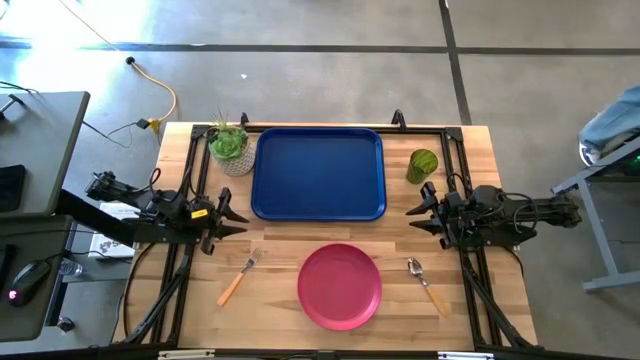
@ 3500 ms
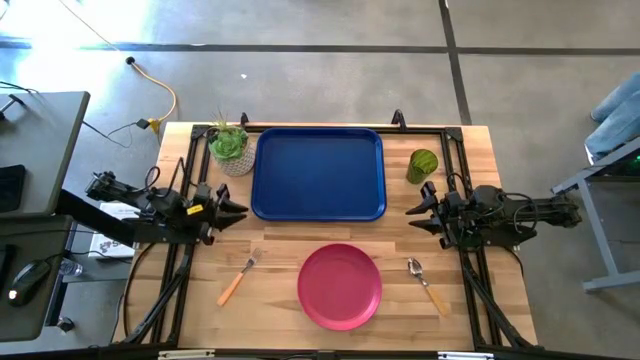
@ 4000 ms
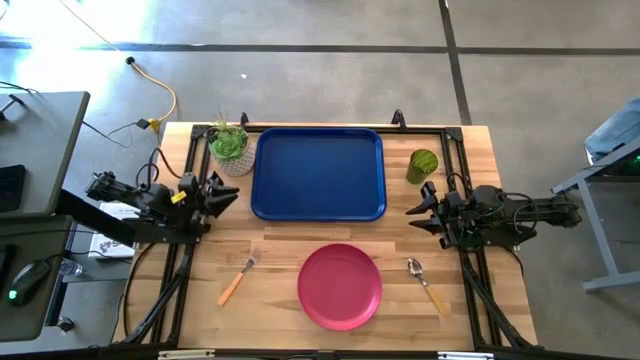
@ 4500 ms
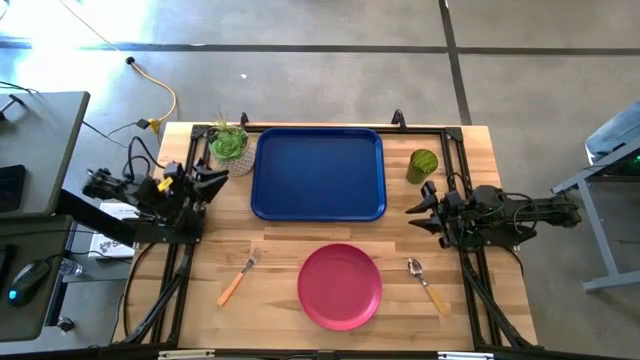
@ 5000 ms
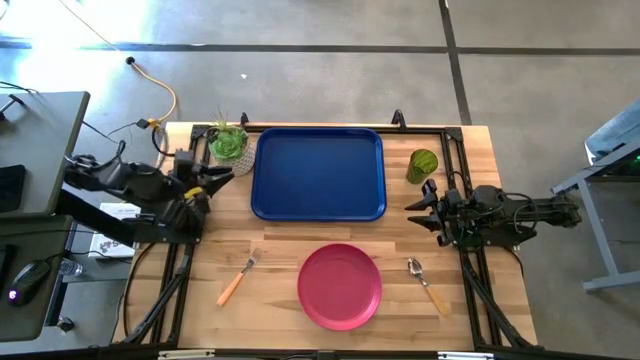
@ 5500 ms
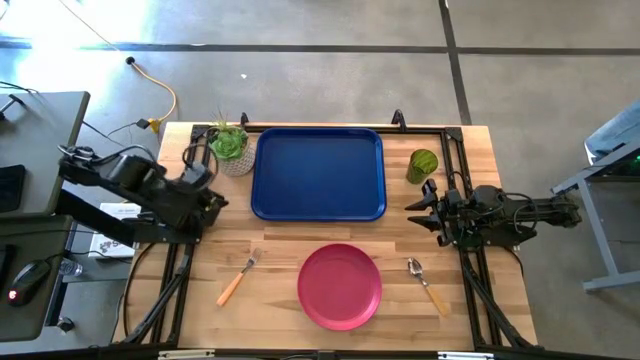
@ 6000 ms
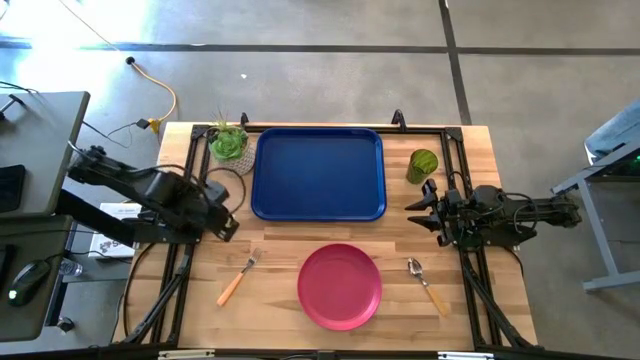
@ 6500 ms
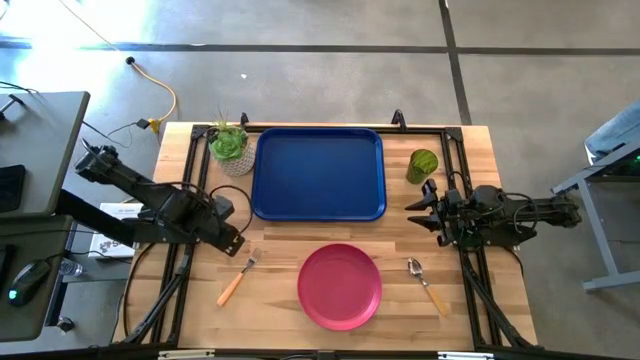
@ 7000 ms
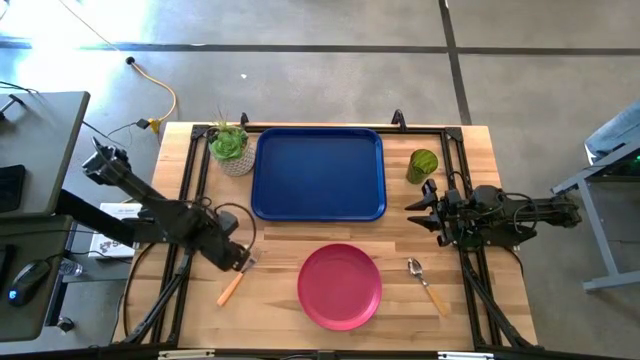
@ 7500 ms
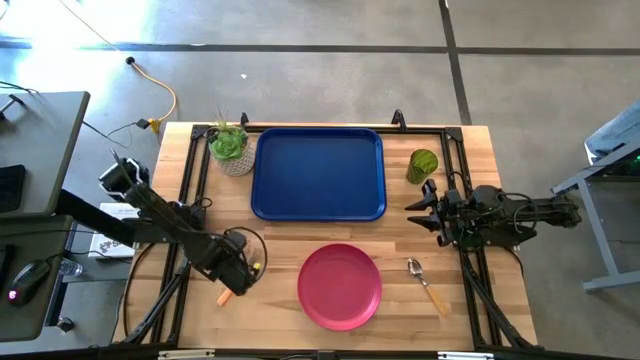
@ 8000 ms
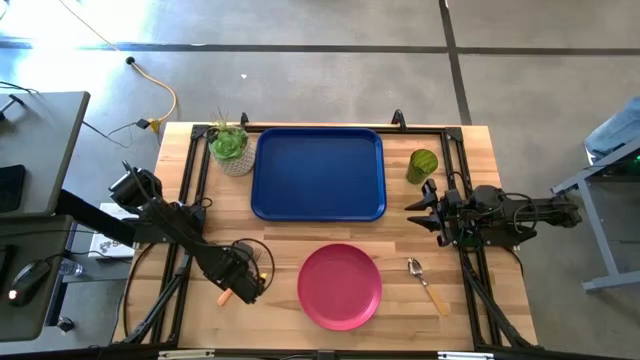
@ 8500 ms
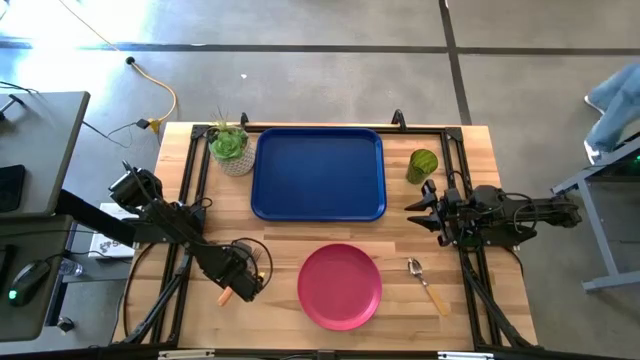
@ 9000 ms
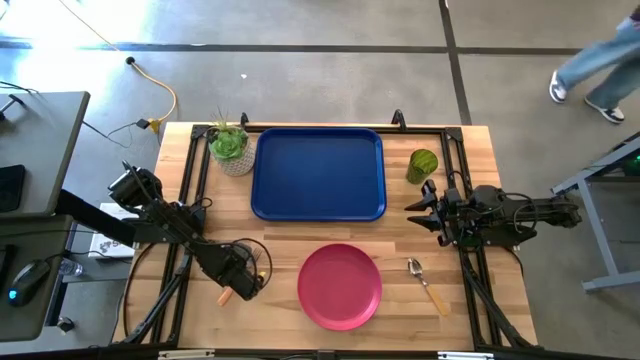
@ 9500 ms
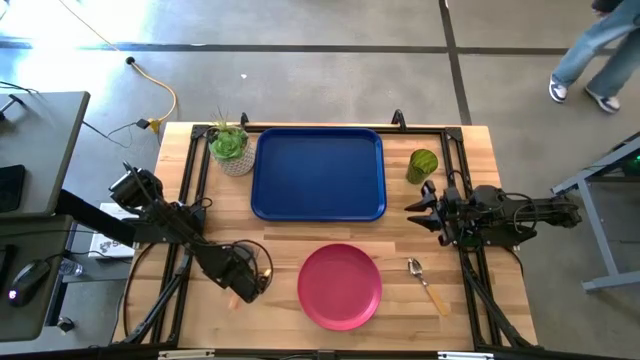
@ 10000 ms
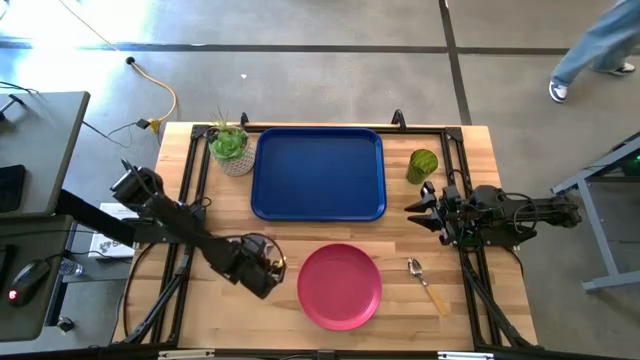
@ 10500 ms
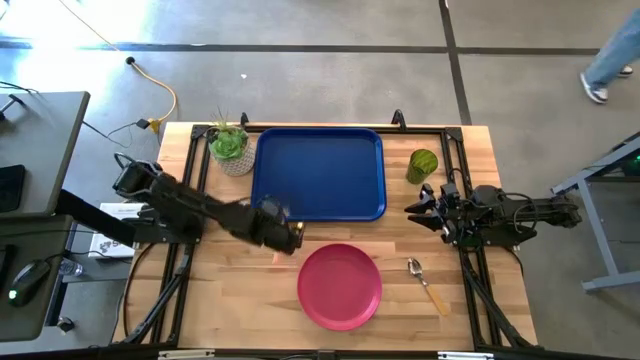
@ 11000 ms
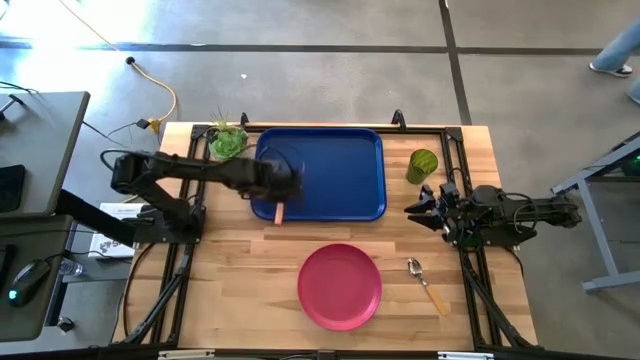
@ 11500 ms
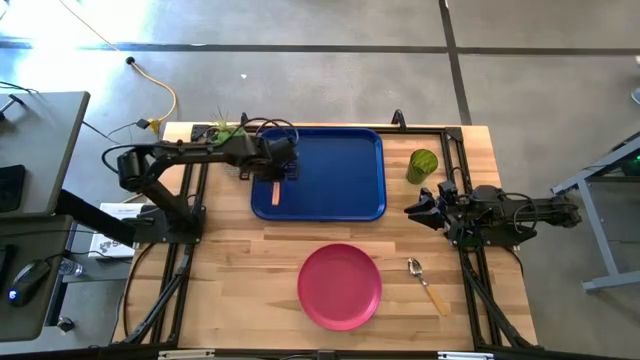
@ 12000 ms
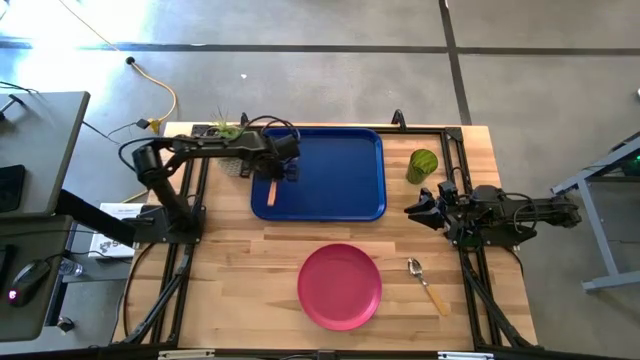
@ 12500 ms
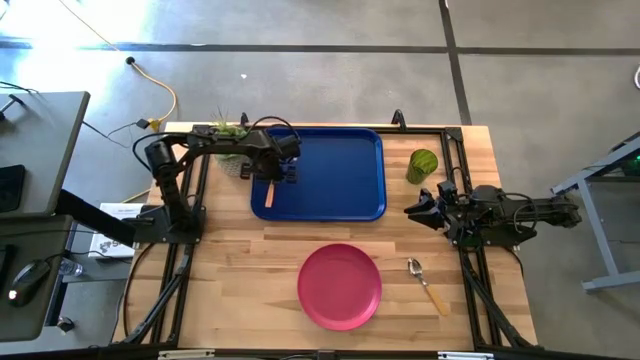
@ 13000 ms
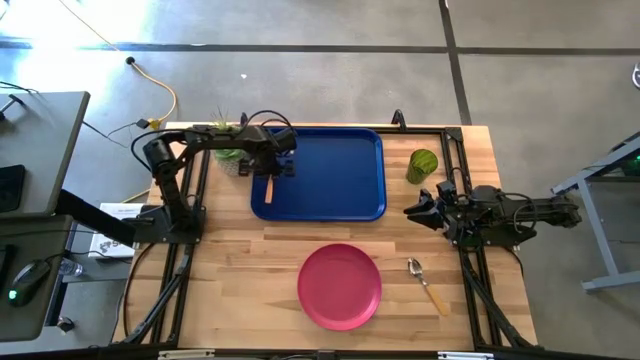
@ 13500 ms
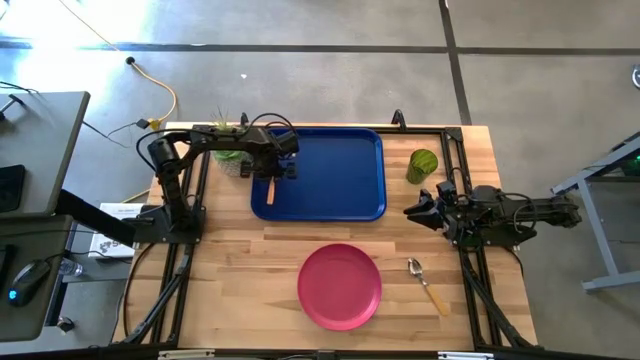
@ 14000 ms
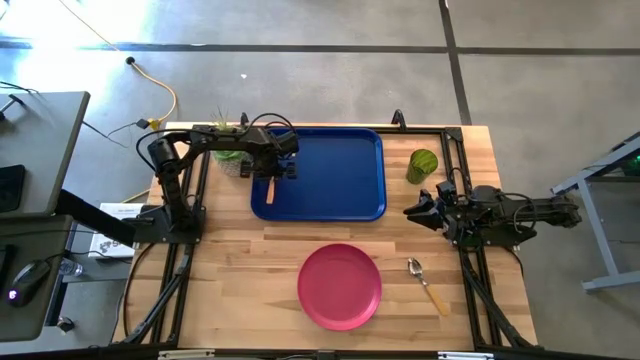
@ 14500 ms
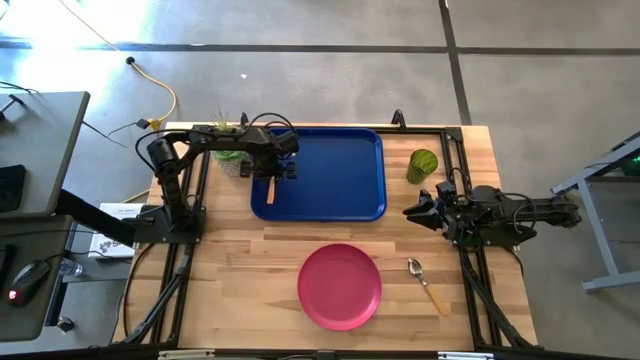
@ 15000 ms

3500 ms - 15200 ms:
Task: Pick and place plate/cup/fork/spoon on tray
Put the orange fork on the left on the blue tray

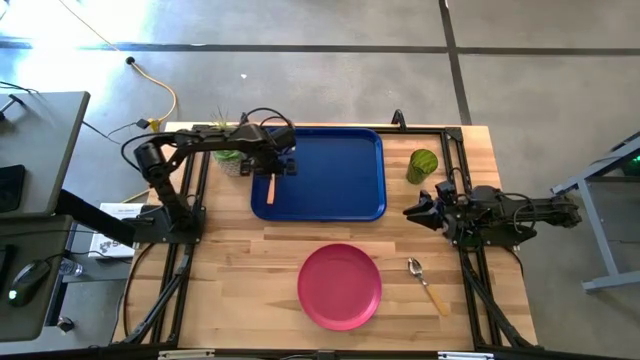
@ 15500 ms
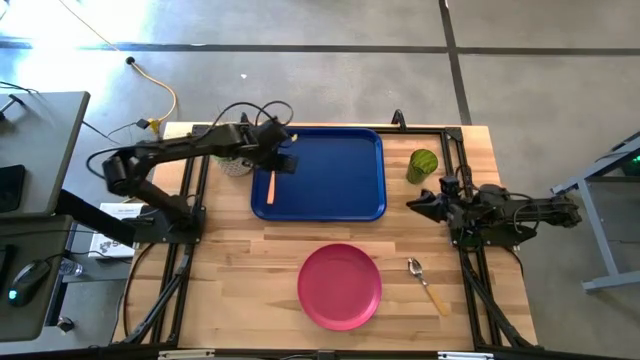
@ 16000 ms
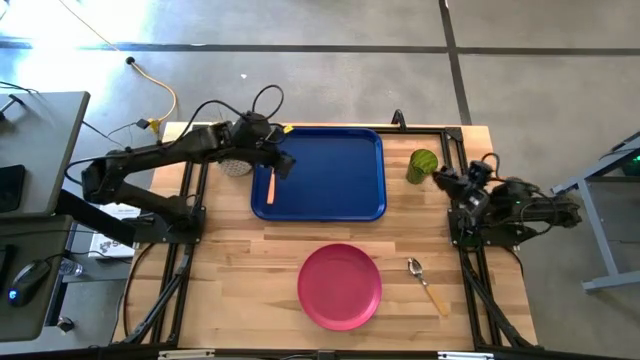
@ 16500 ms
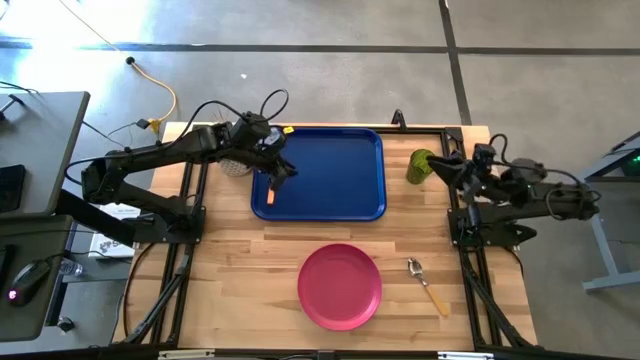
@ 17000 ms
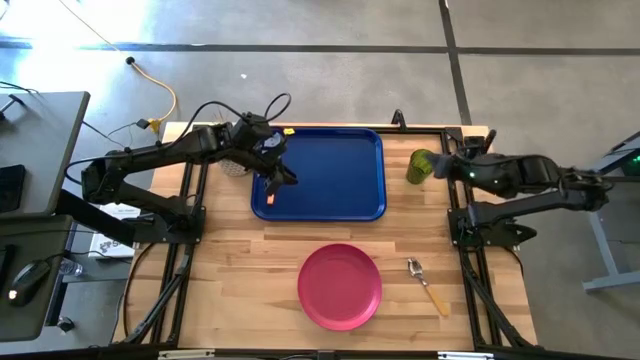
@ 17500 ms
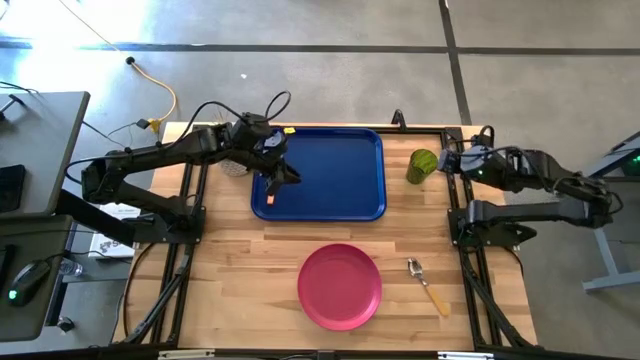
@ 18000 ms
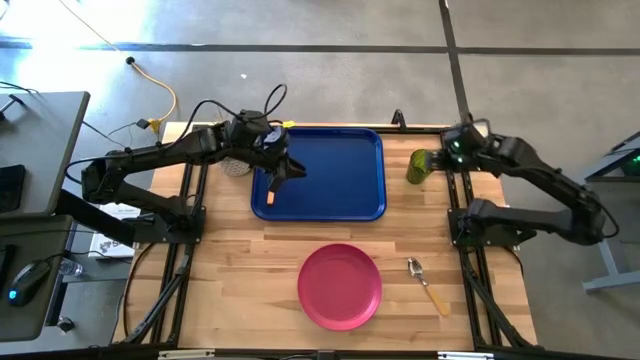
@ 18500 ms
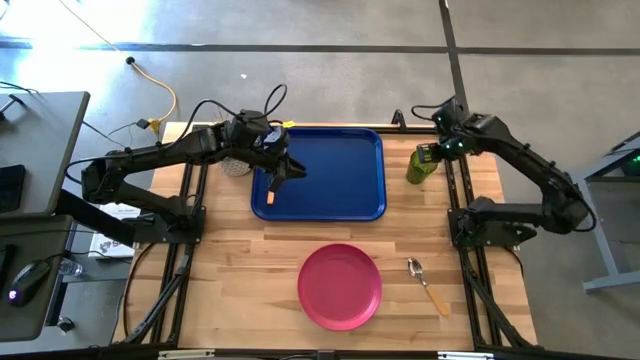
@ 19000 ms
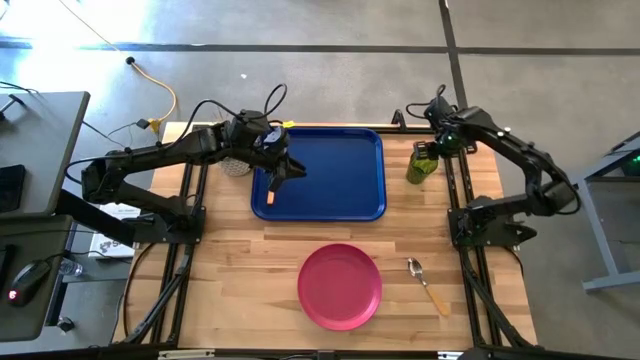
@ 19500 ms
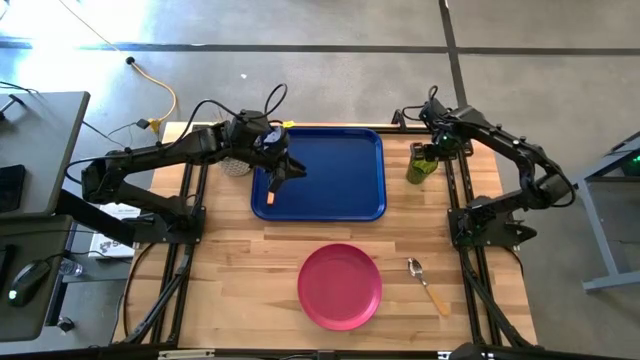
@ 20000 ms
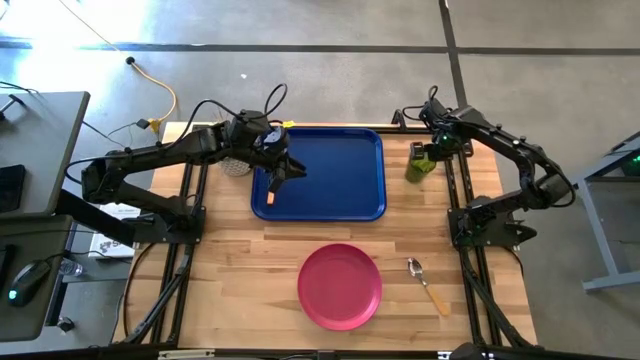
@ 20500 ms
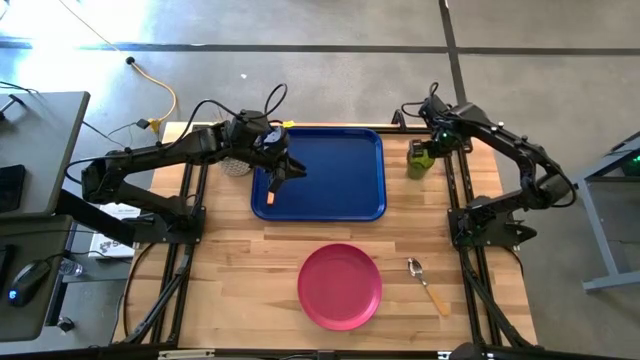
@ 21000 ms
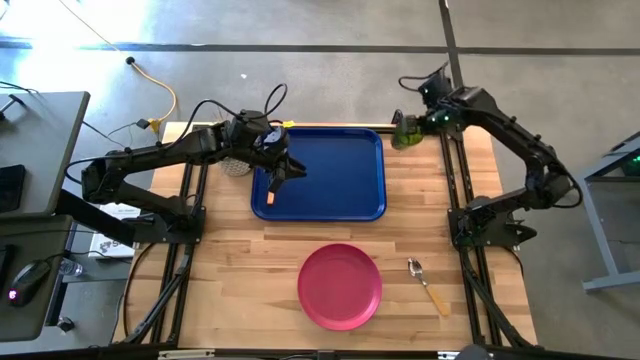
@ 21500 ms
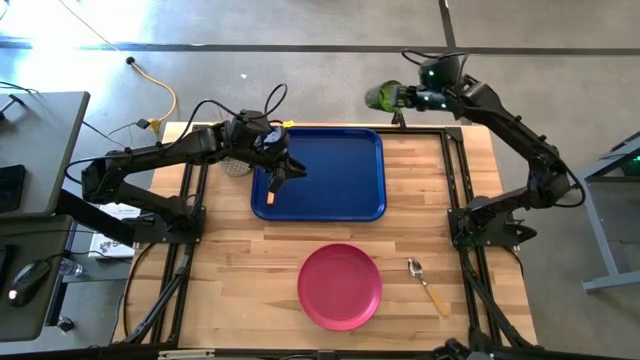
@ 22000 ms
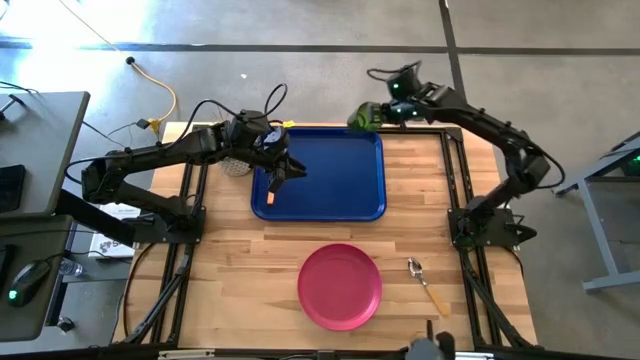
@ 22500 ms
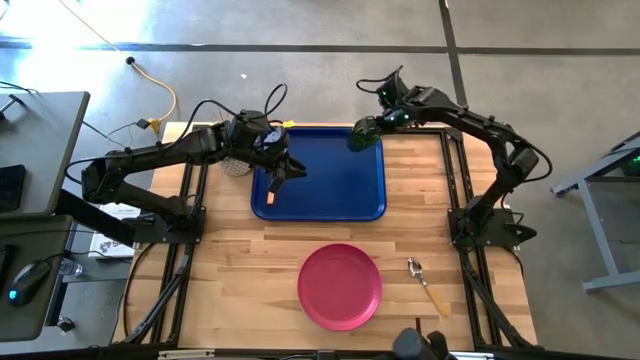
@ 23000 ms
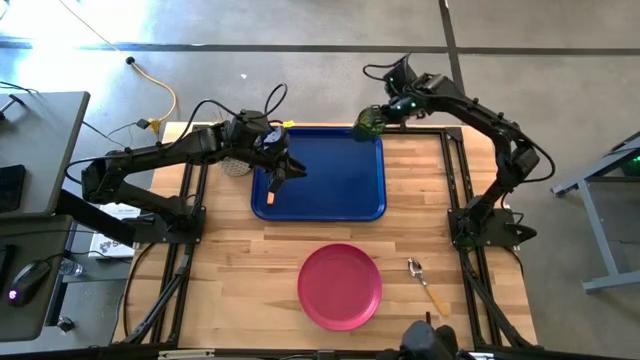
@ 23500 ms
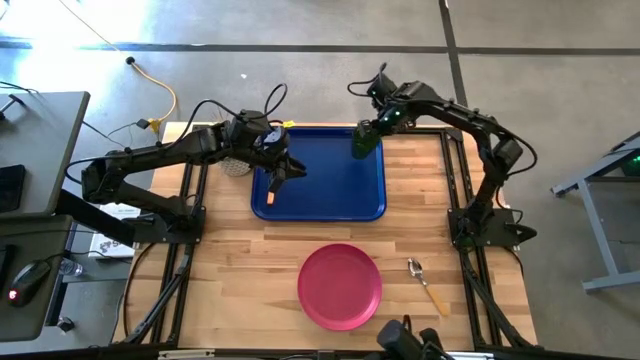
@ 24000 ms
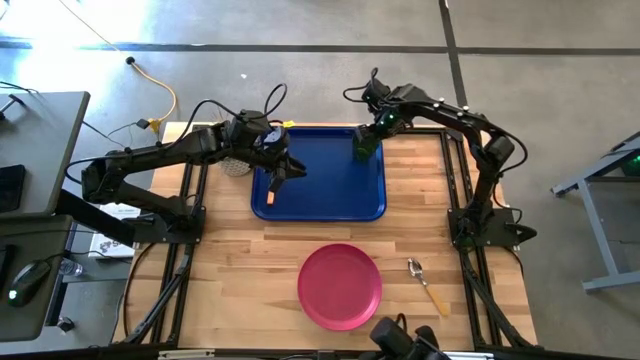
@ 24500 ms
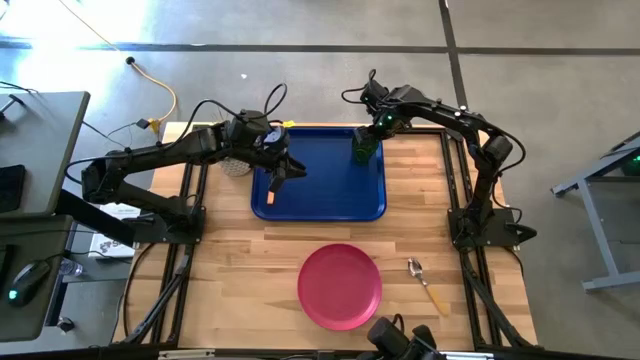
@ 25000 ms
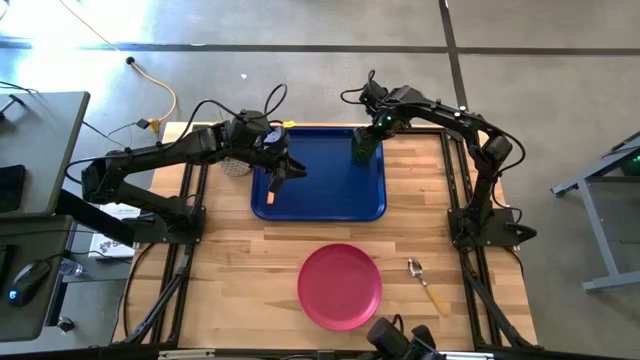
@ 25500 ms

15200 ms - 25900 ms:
Put the green cup in the top right corner of the blue tray
